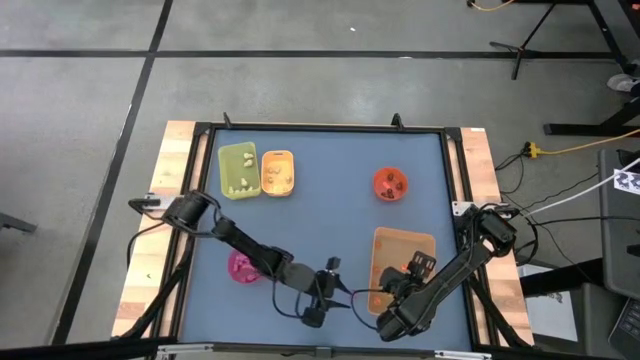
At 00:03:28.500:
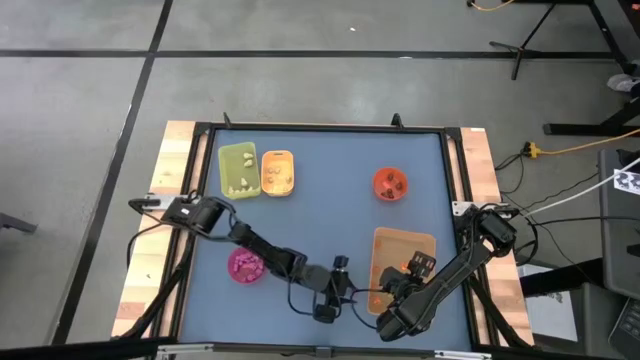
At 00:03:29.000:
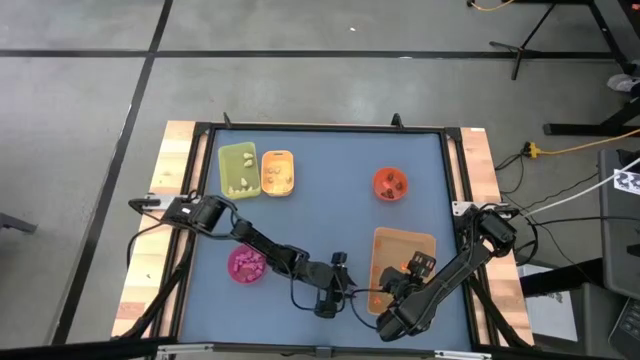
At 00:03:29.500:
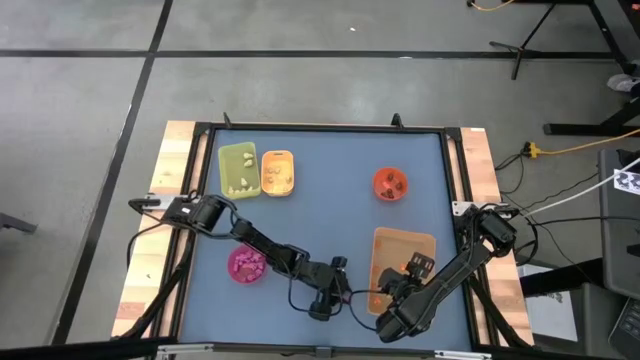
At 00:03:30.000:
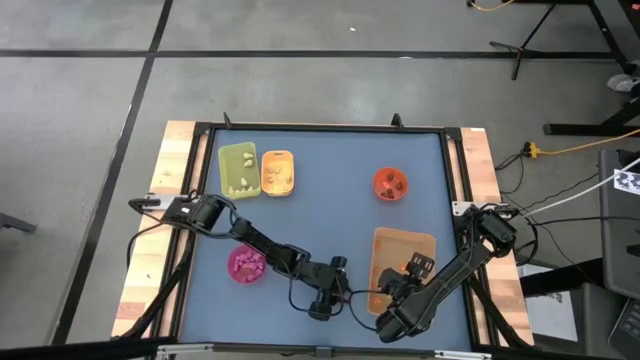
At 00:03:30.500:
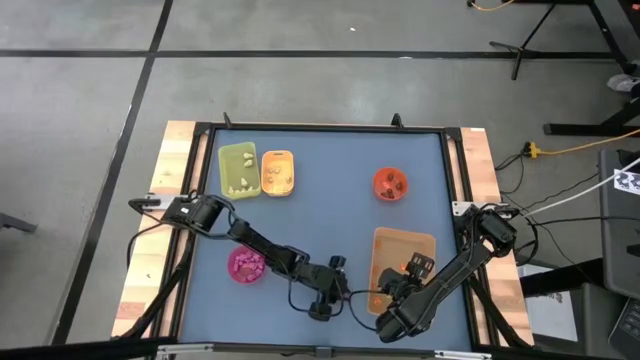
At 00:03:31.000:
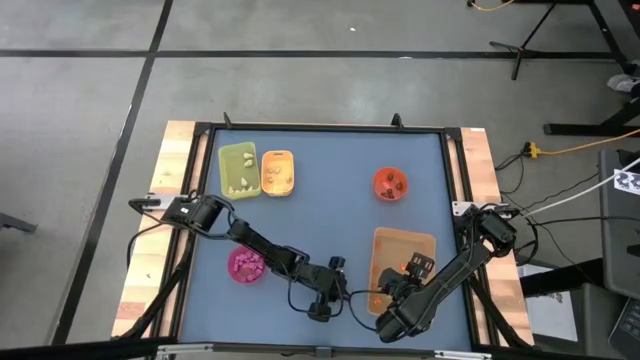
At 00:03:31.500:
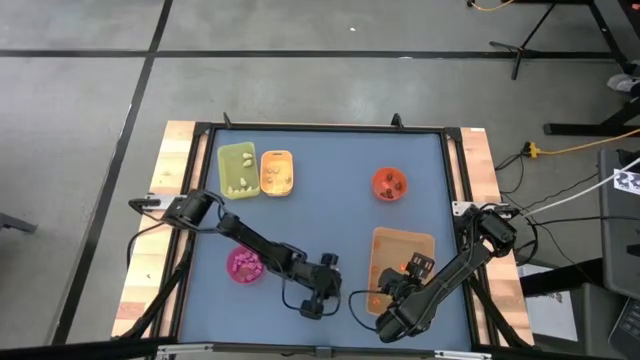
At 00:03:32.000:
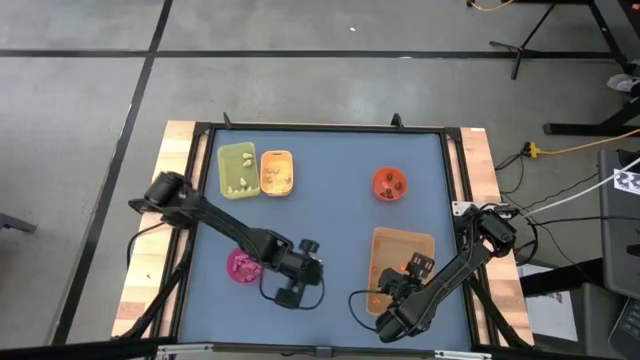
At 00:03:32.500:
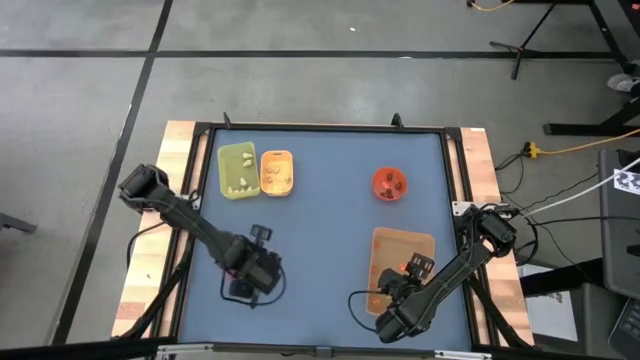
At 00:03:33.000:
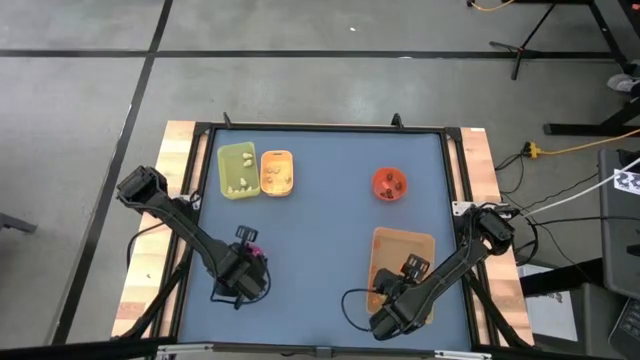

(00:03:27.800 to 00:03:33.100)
Task: Sort Halloween decoration
Put the pink skeleton toy into the red bowl

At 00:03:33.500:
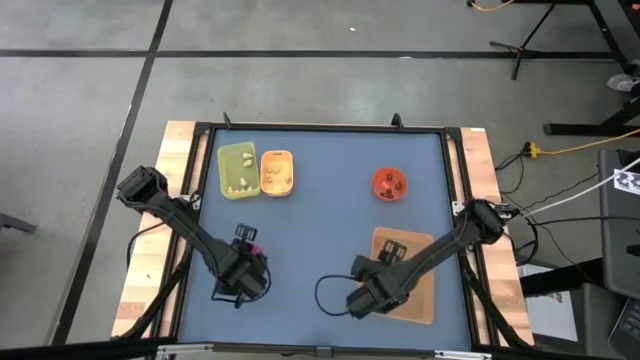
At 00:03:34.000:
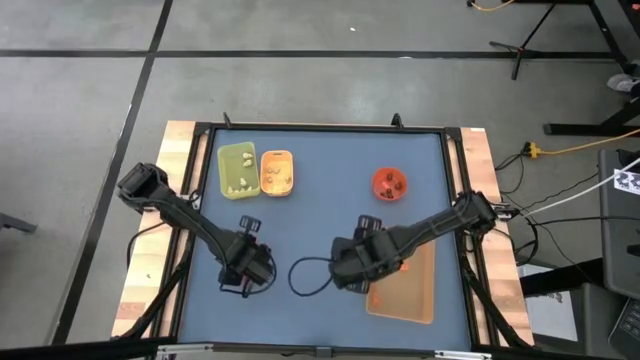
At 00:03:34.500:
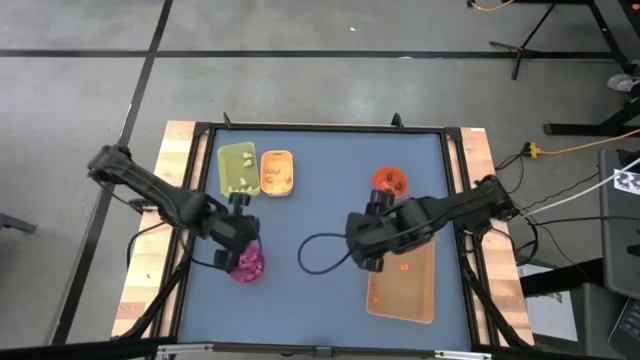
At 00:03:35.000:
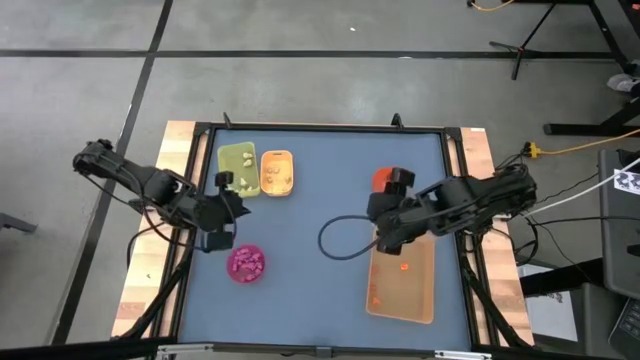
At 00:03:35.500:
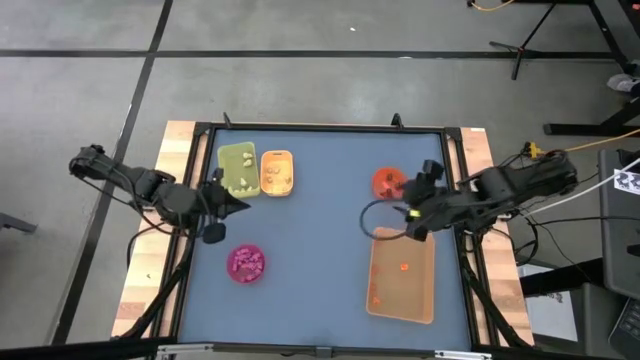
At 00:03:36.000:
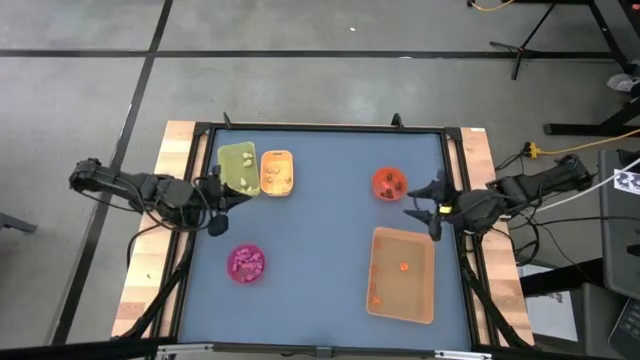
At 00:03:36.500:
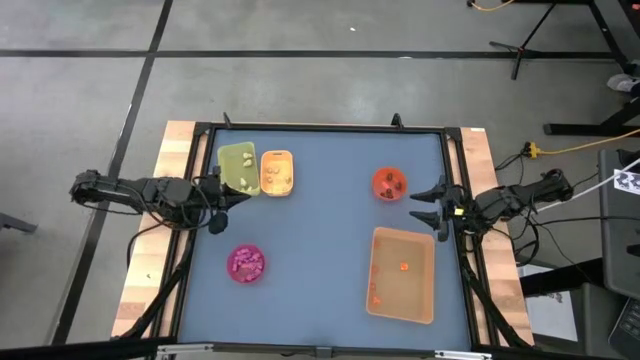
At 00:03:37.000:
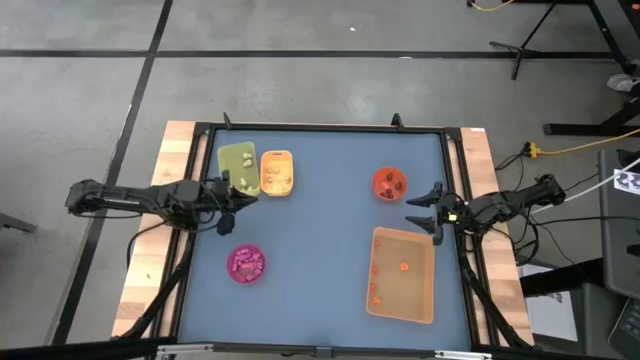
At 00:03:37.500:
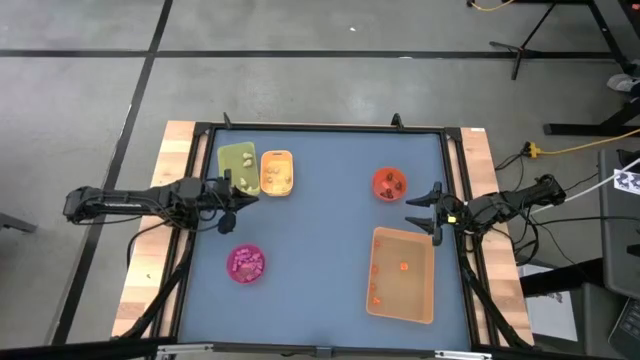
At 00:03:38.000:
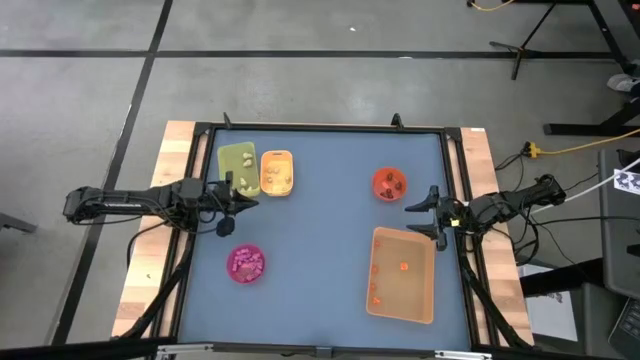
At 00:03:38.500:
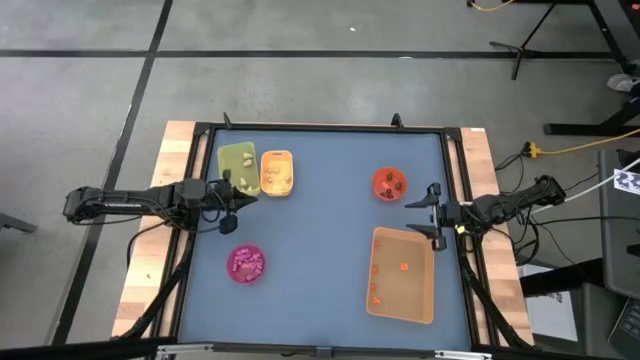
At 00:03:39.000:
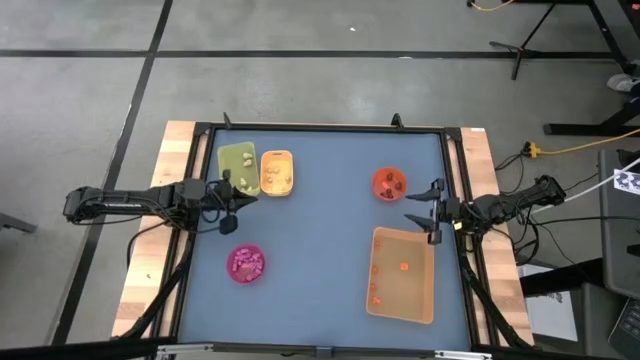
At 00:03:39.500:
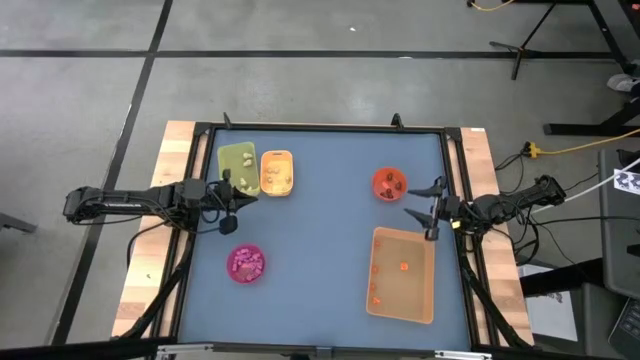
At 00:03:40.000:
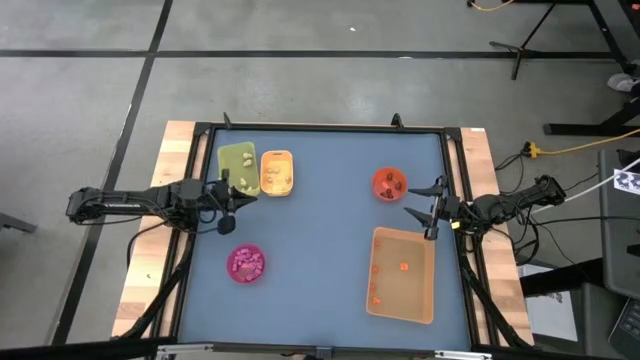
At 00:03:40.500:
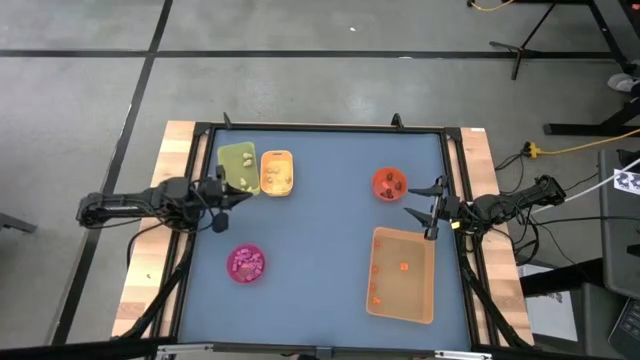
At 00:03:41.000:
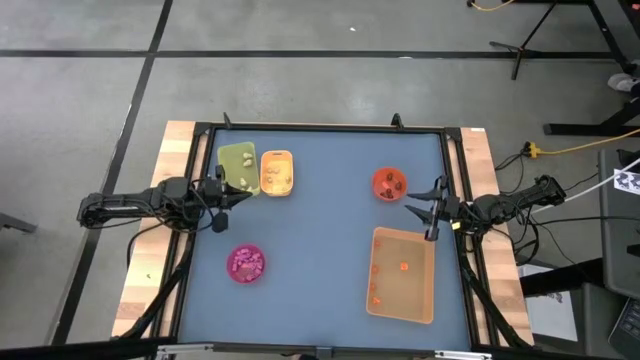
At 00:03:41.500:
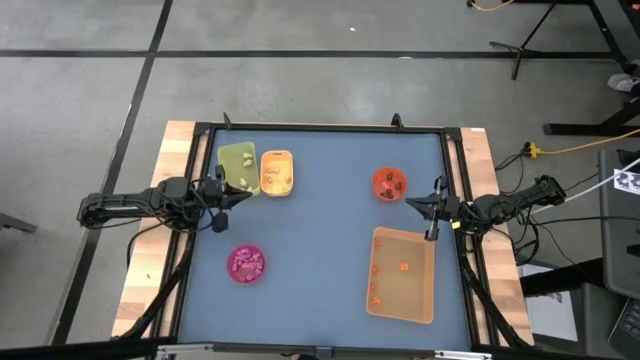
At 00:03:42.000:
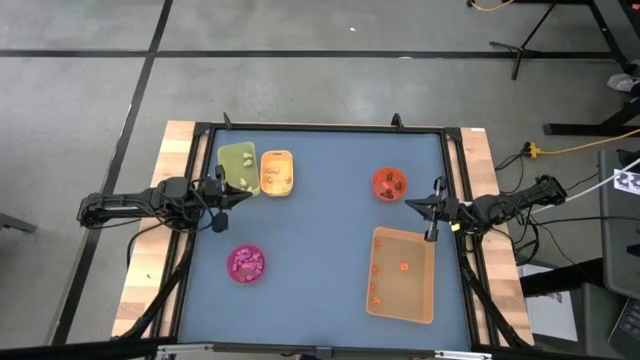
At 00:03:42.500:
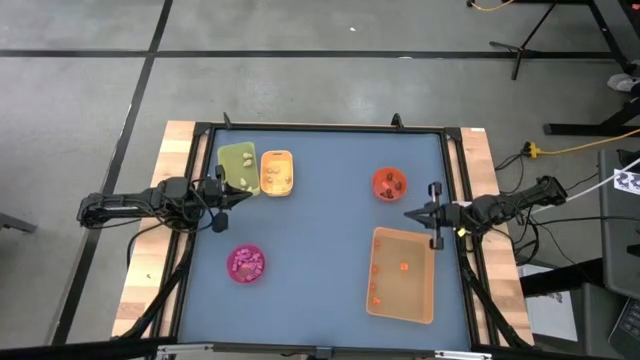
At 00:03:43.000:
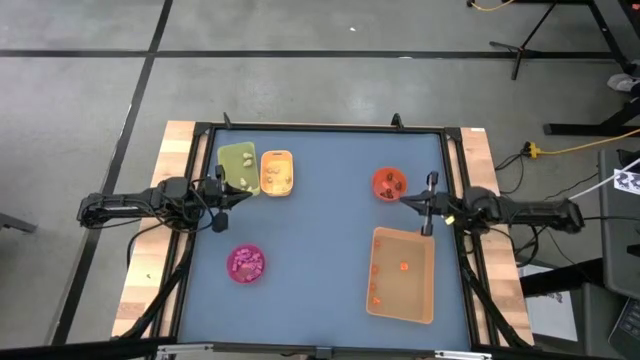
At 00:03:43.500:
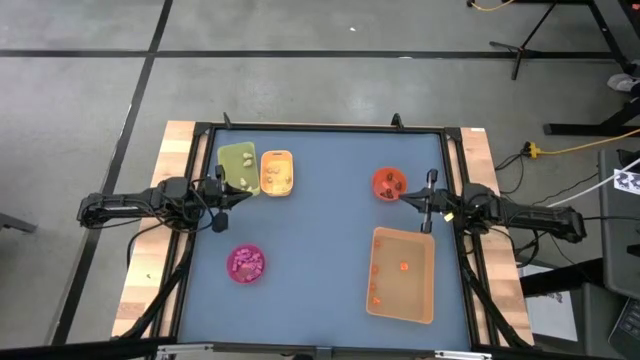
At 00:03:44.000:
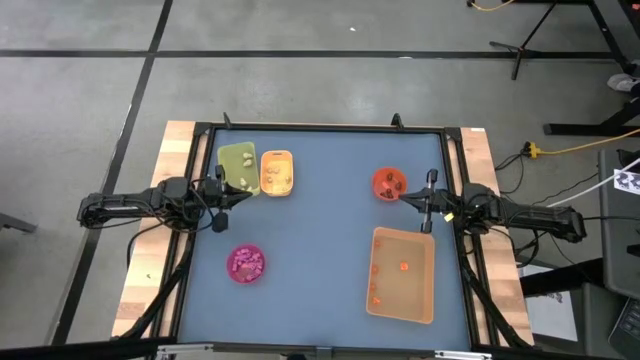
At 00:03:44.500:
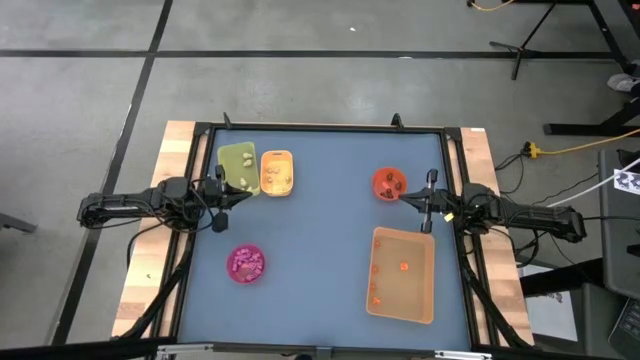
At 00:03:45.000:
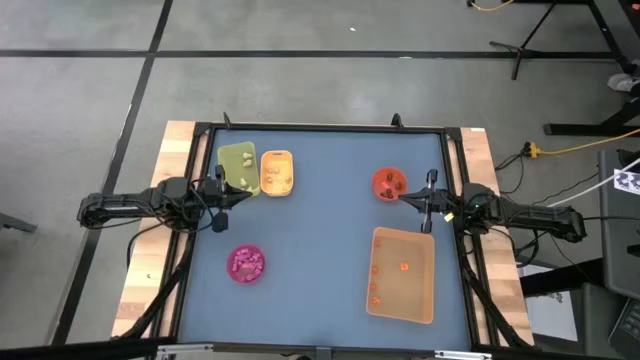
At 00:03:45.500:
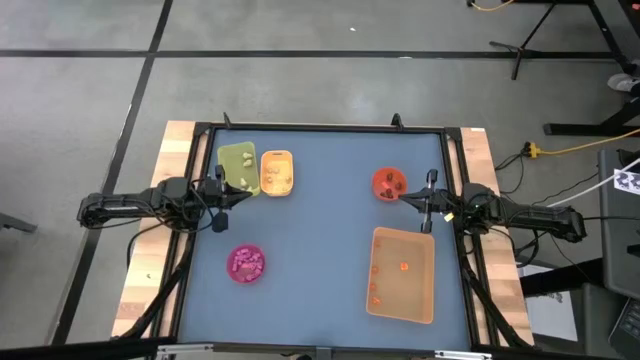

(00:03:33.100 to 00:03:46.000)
Return to Home Position
